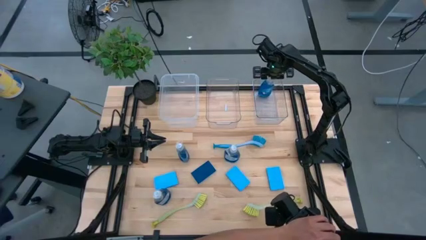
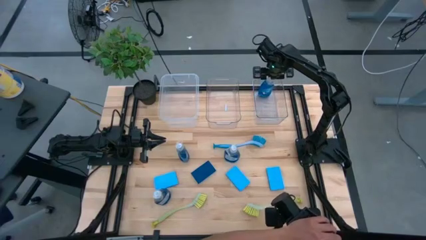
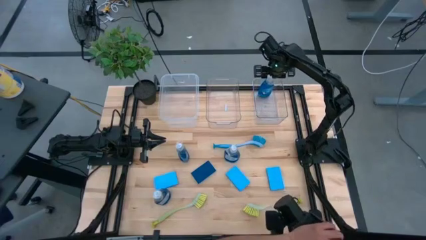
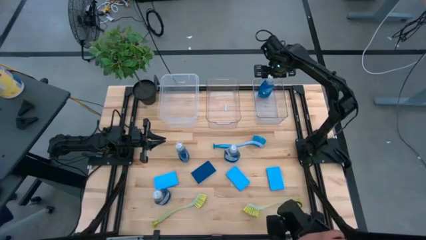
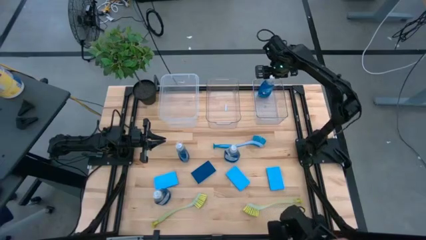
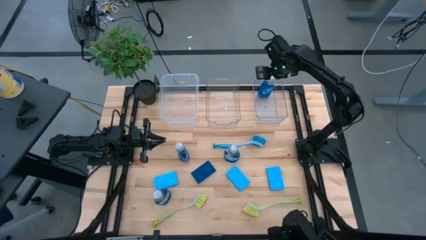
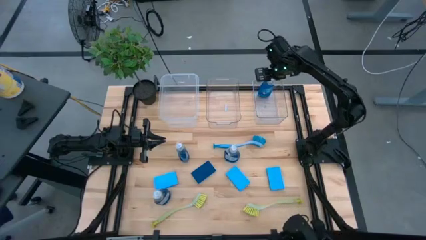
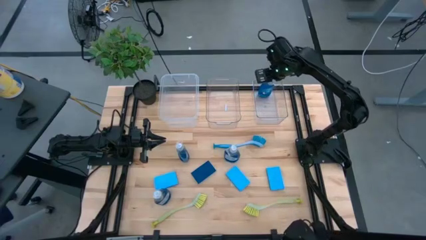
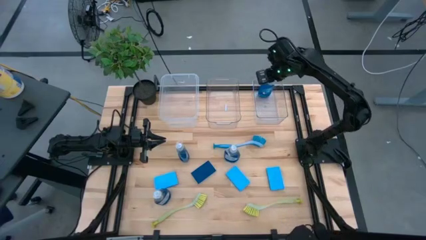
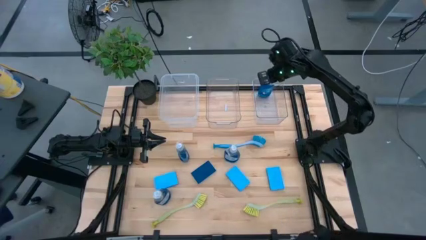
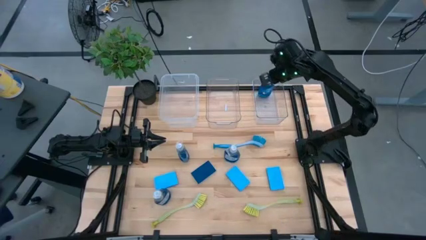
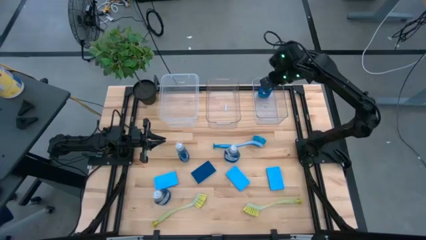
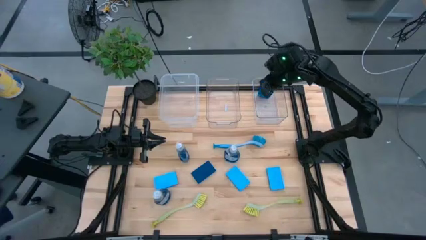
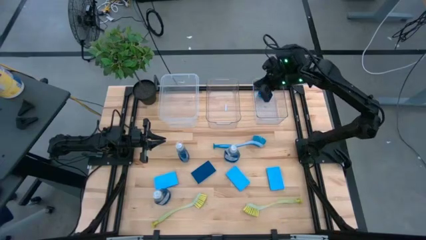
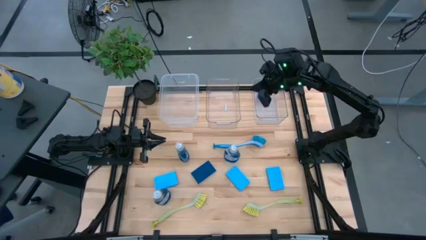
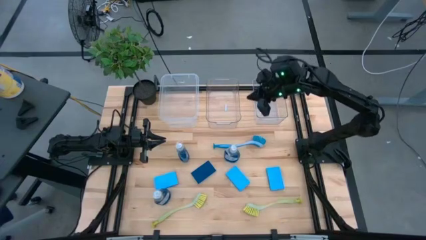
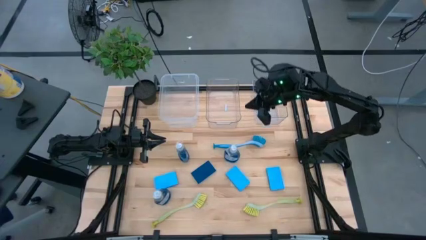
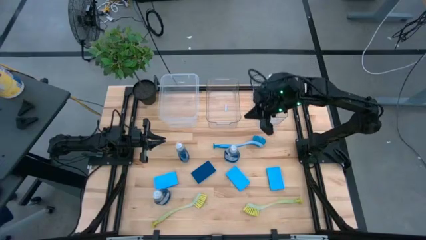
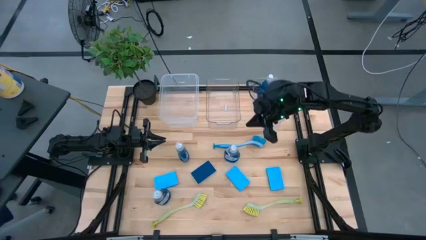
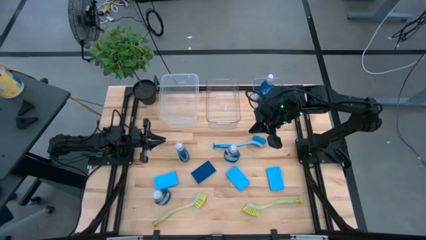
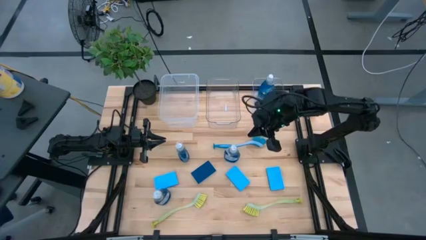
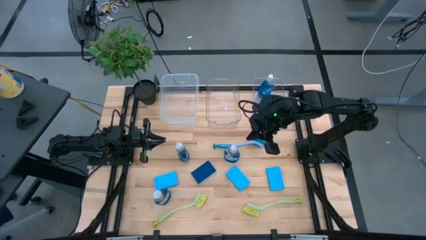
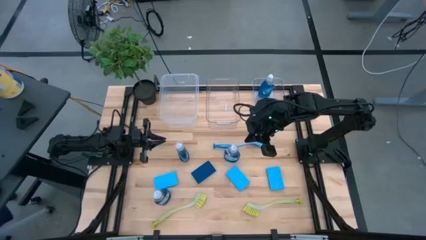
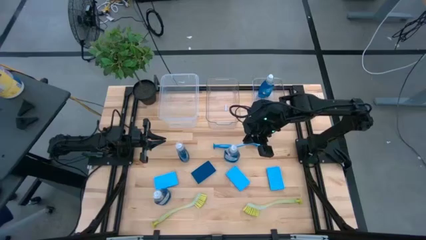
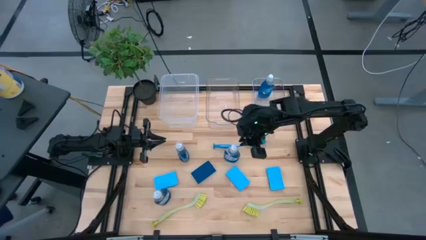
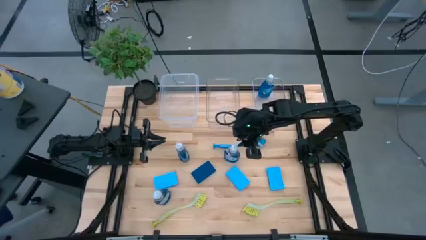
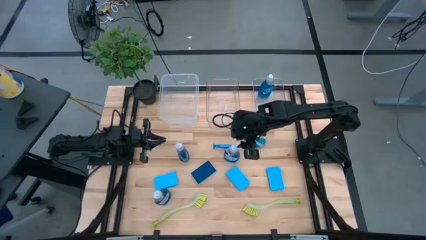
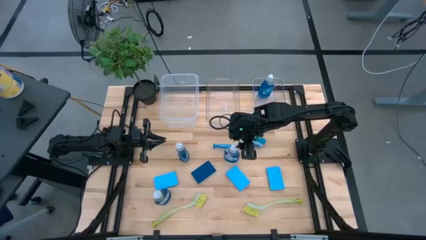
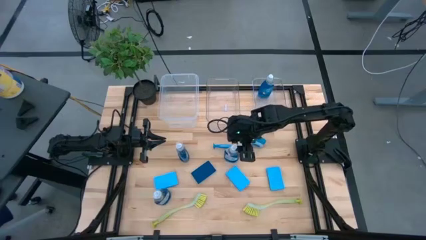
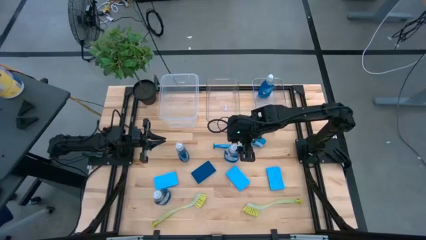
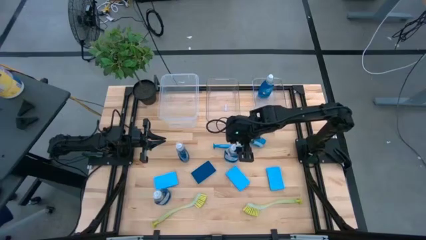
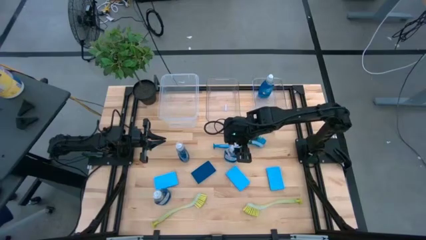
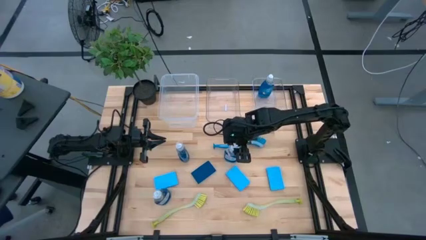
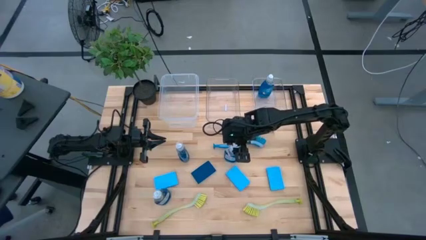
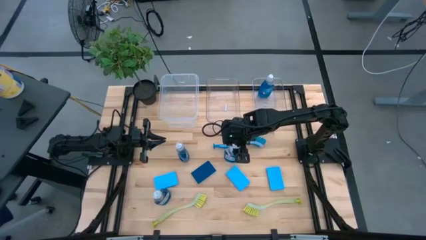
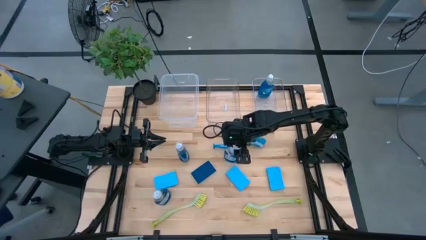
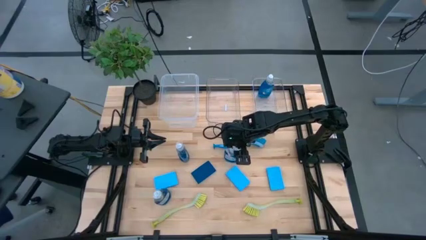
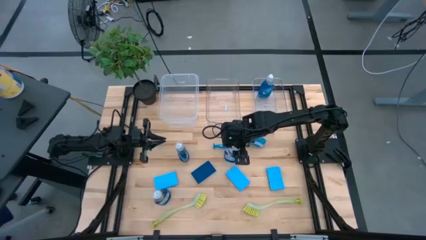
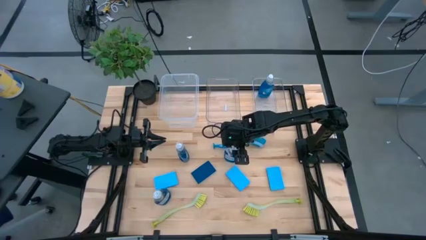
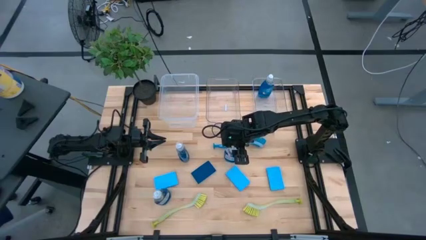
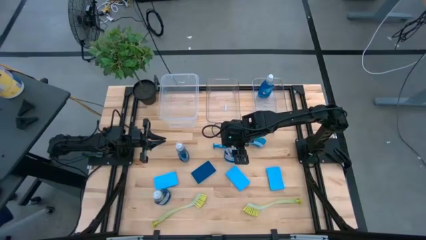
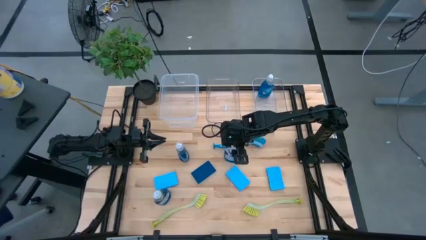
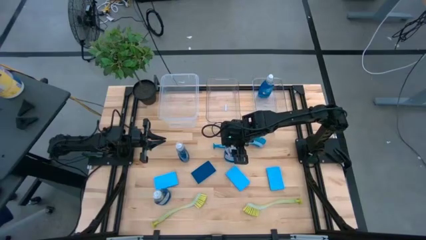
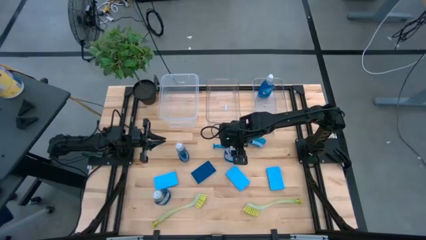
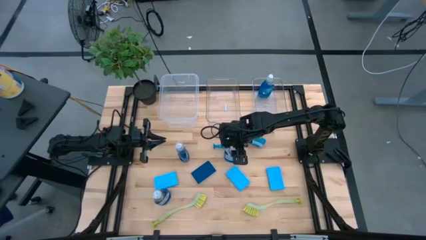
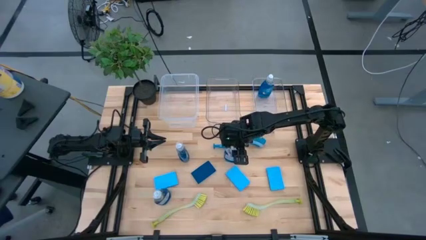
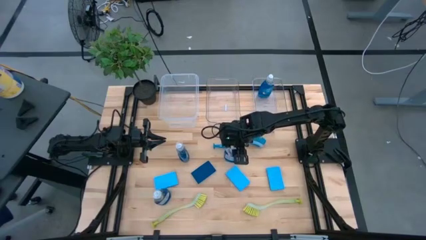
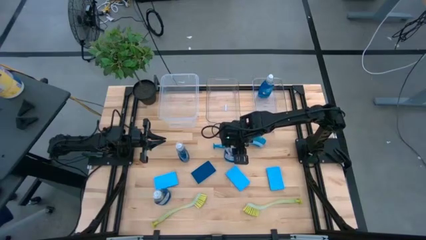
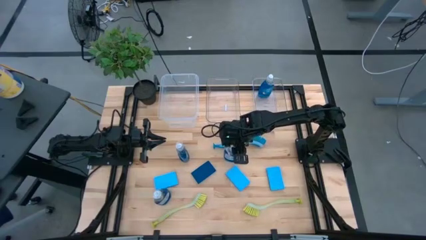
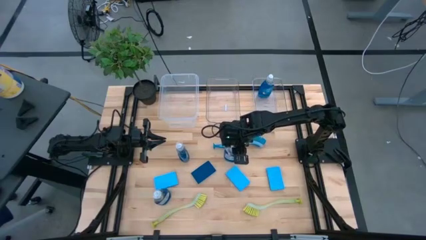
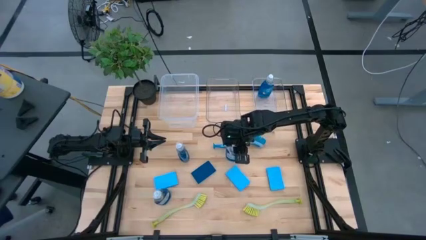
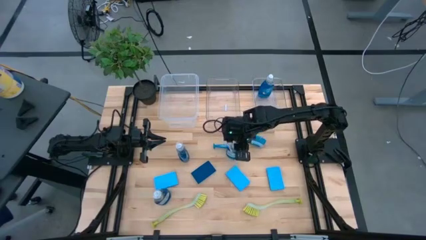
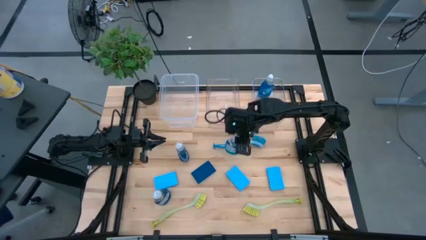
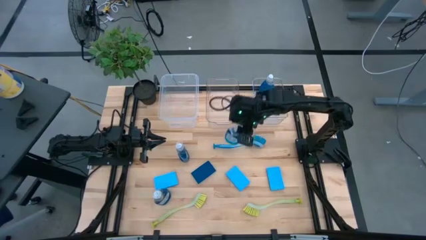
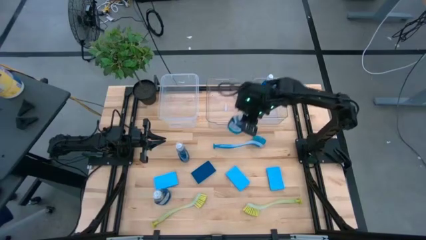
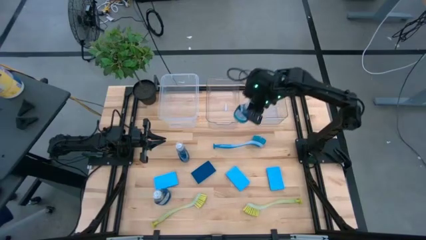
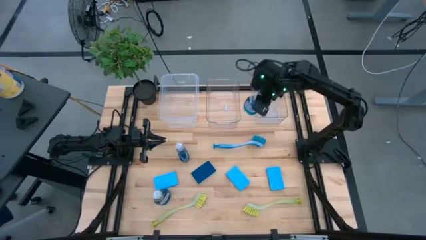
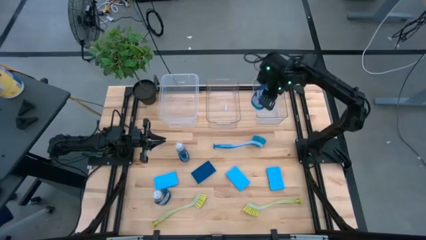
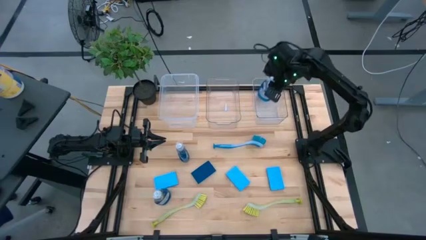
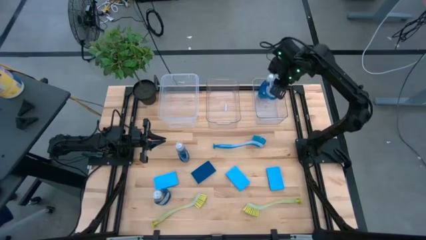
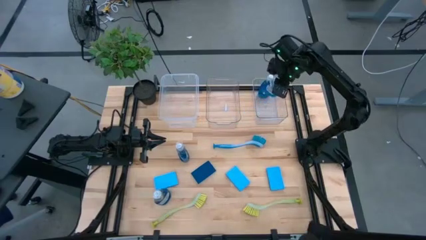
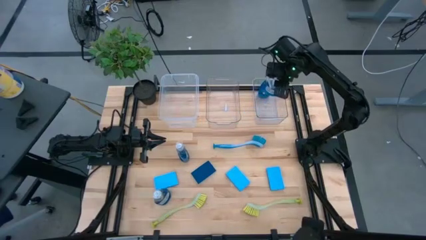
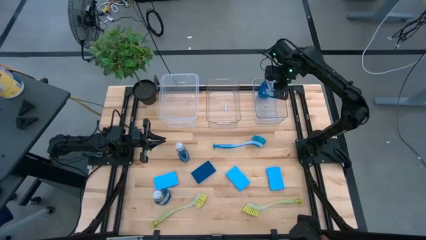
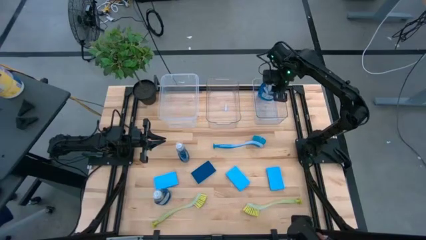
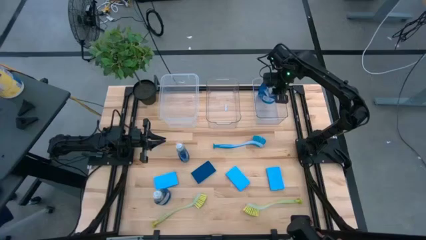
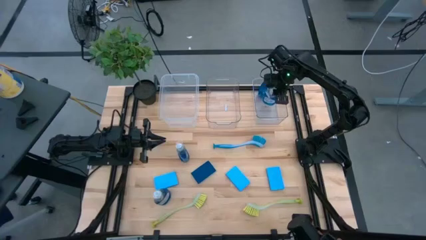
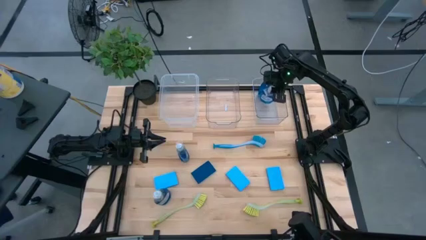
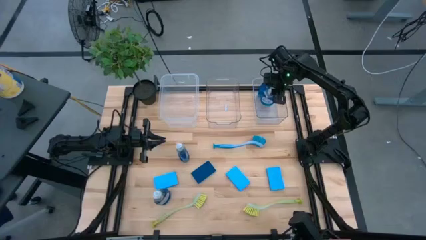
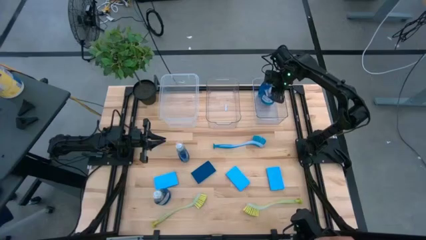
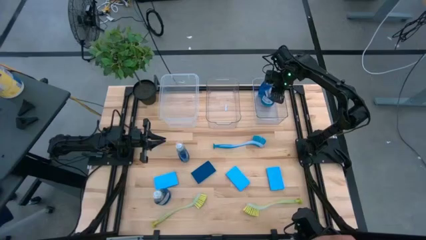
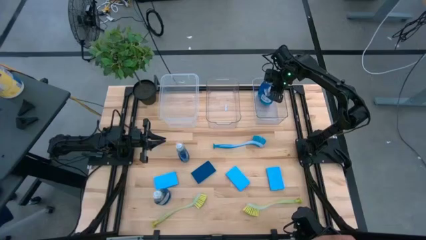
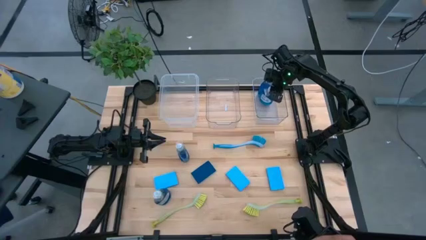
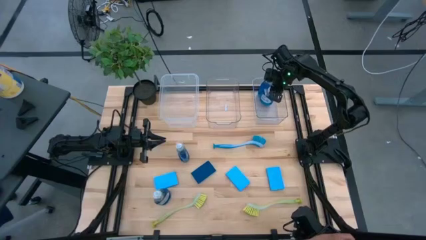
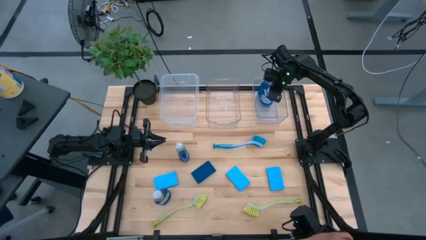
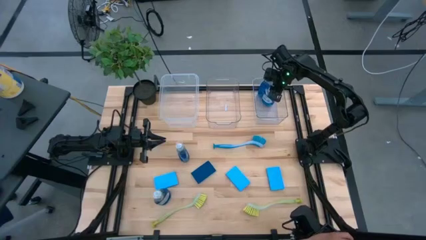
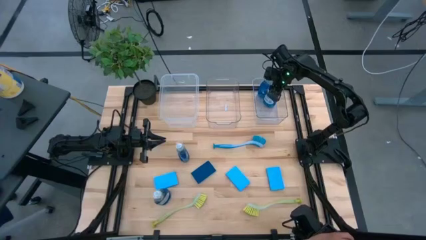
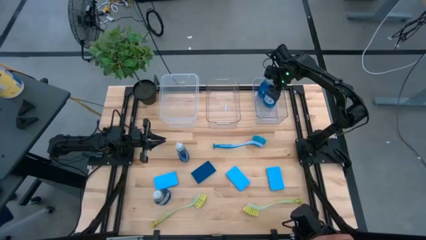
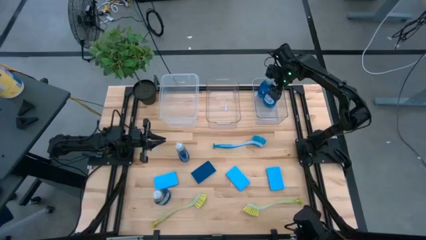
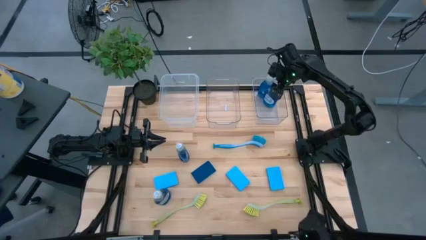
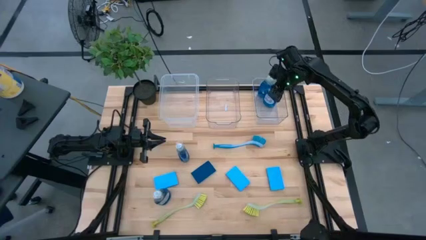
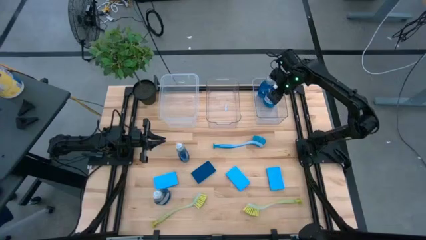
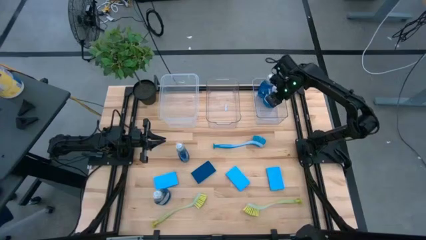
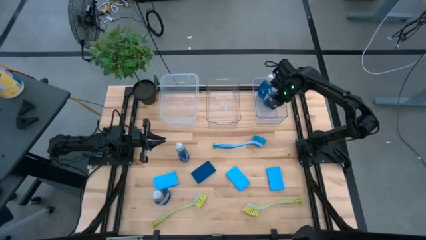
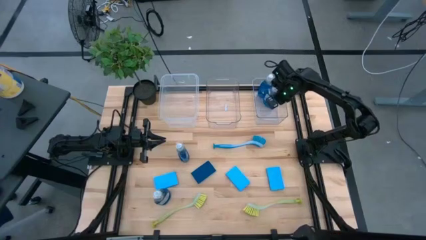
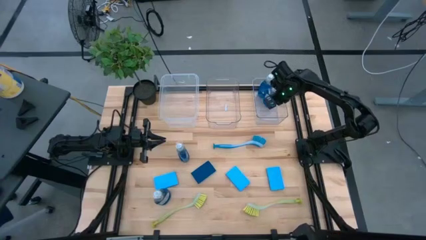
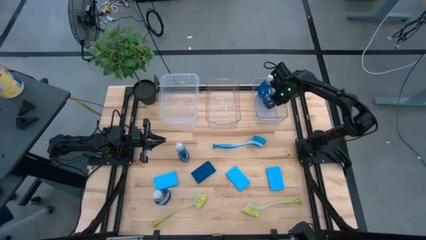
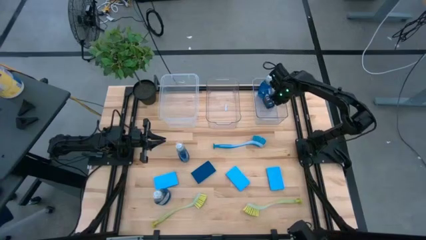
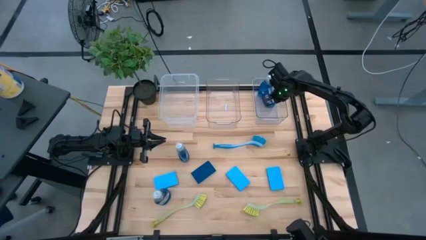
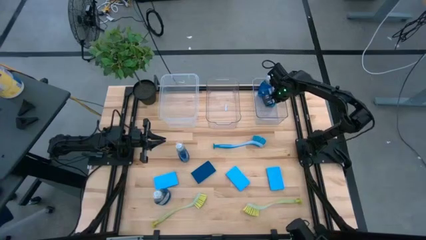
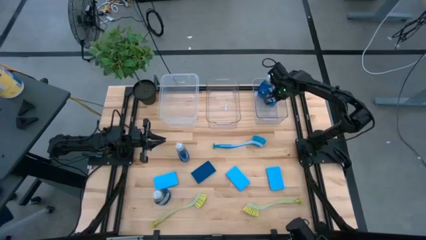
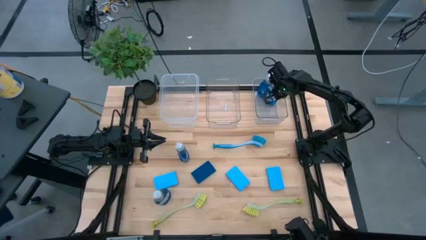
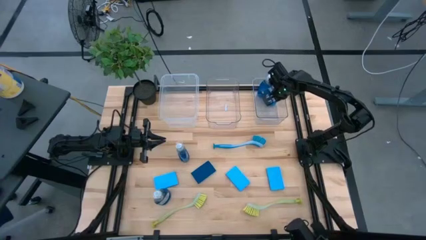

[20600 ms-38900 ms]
Task: Pick & Place Kitchen Sink Supplies
Put the blue detergent into the right transparent bin
